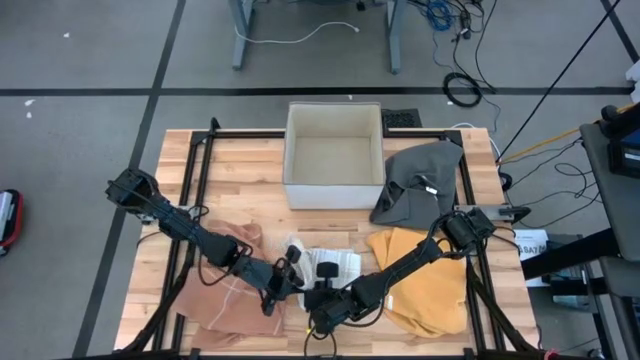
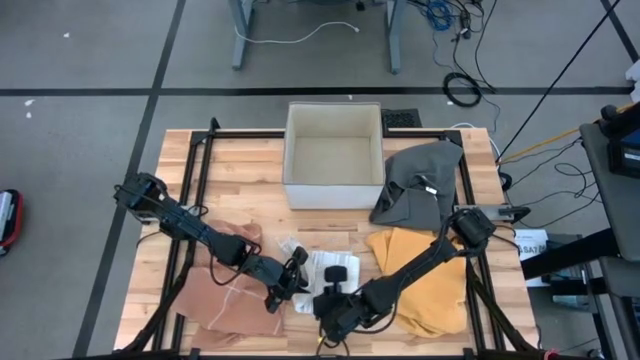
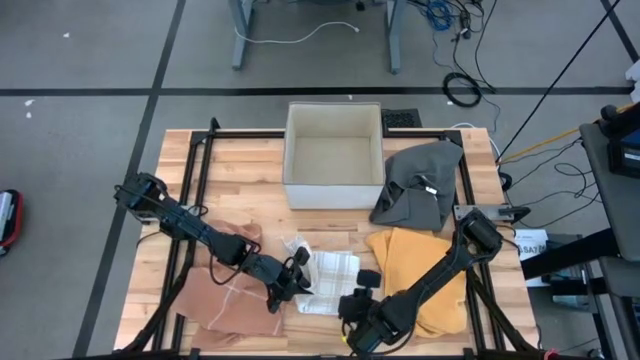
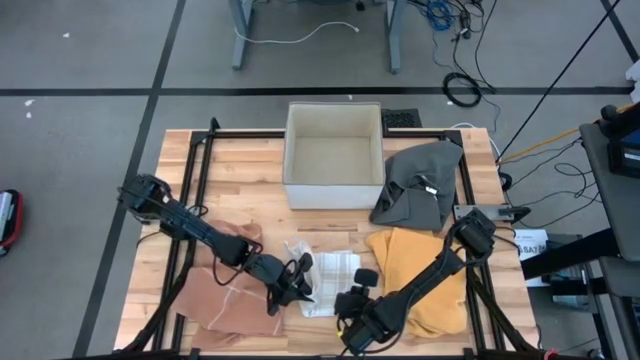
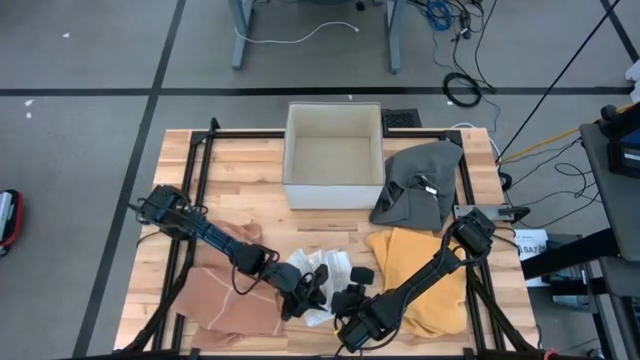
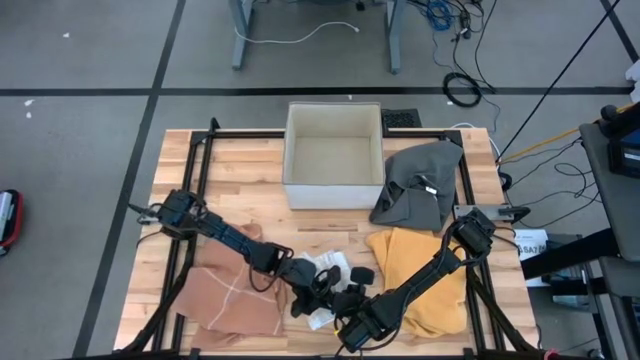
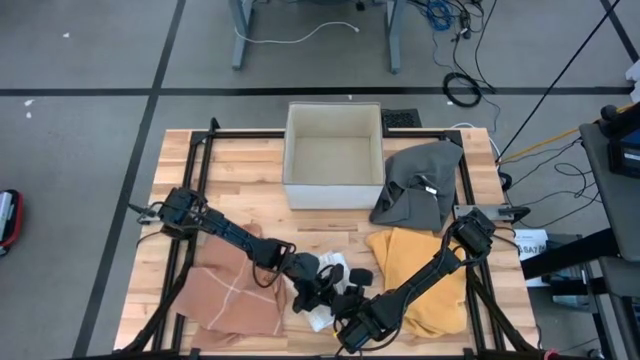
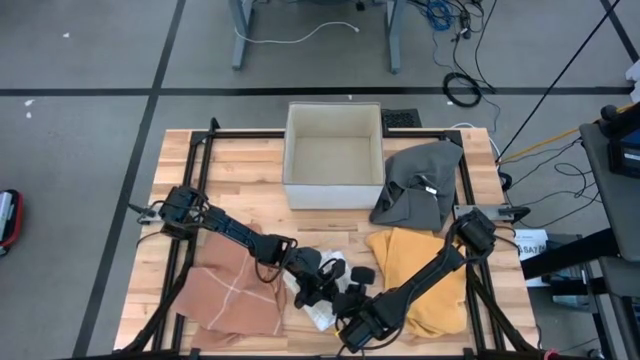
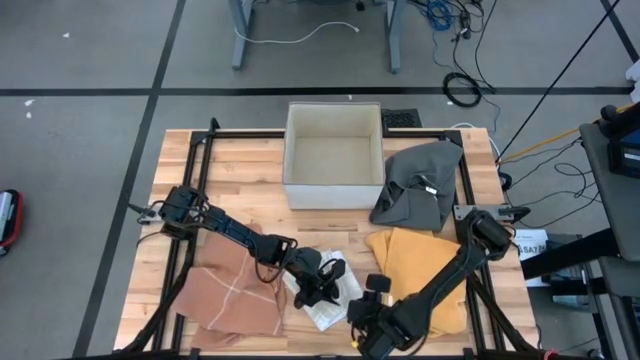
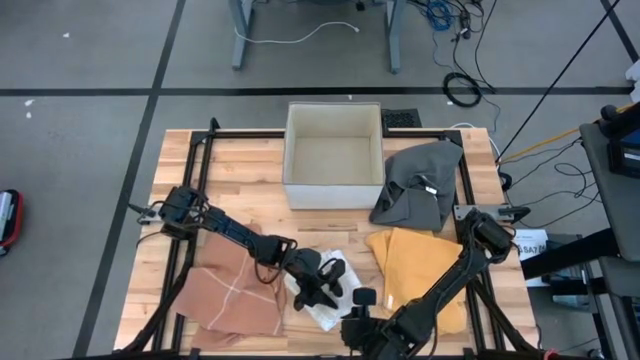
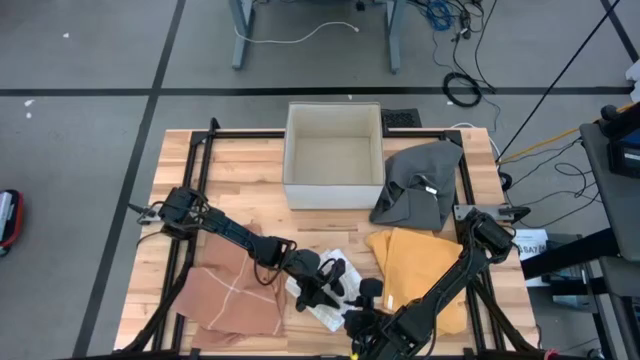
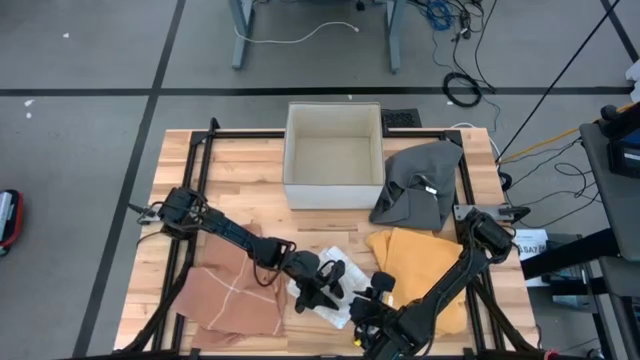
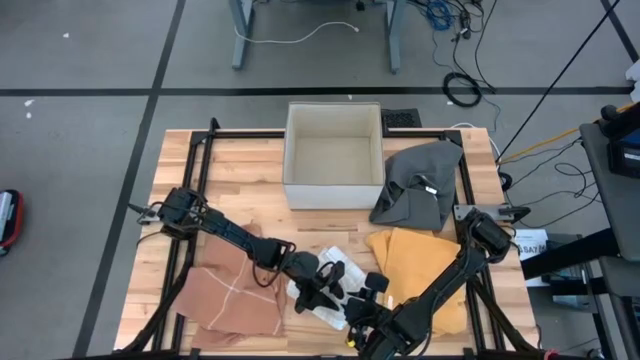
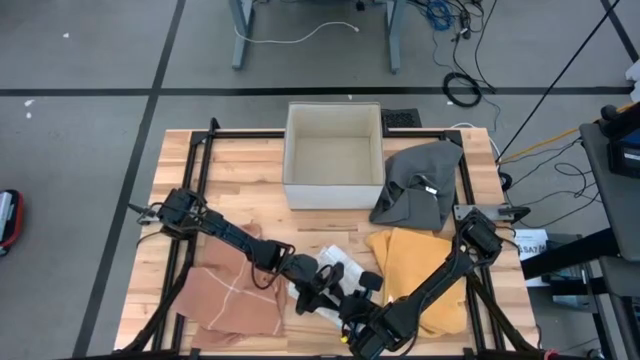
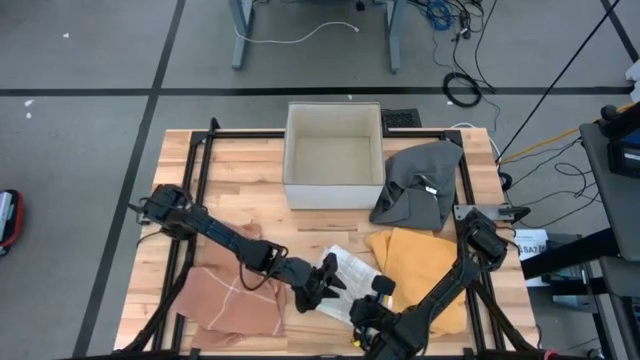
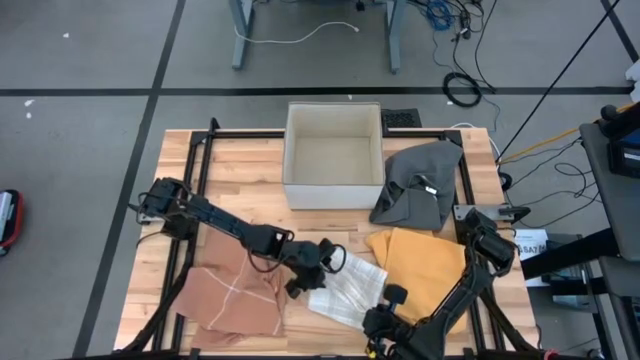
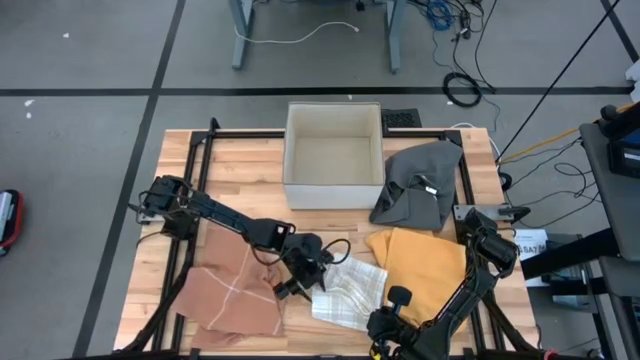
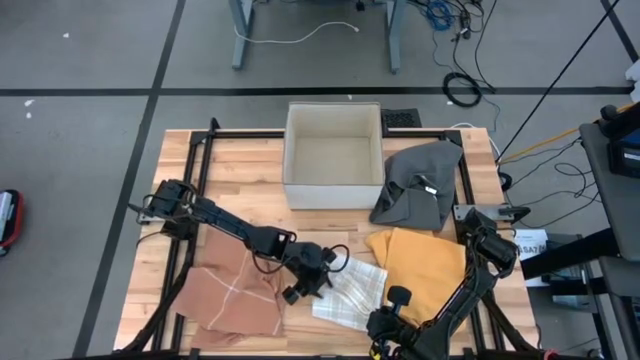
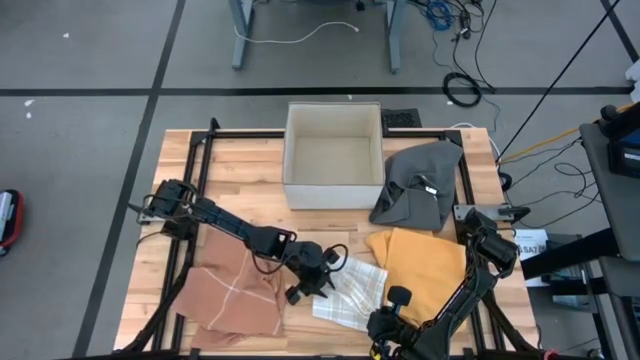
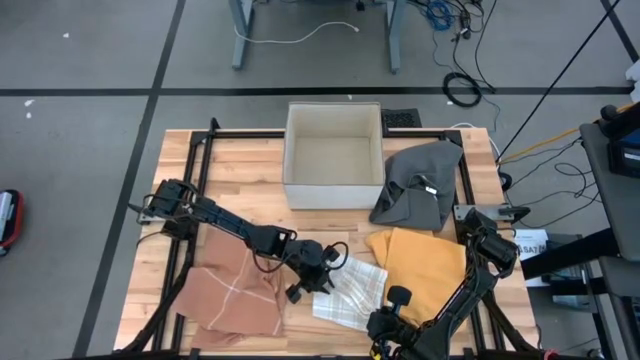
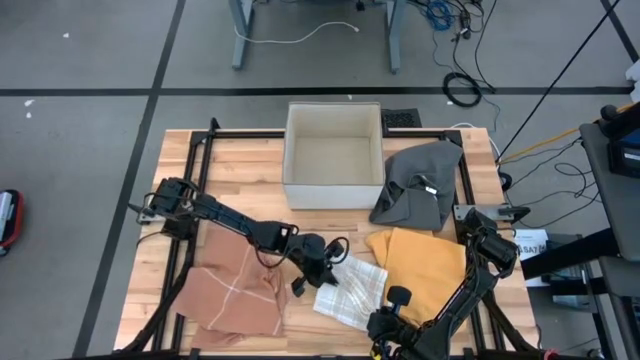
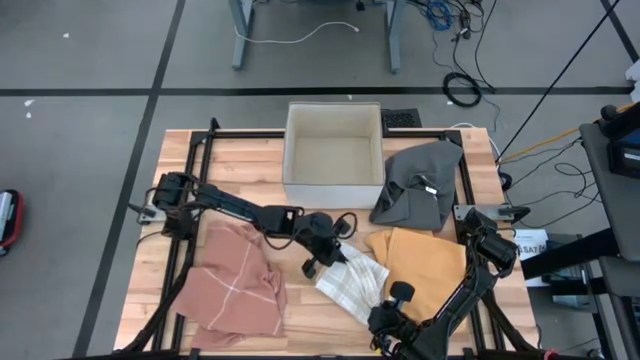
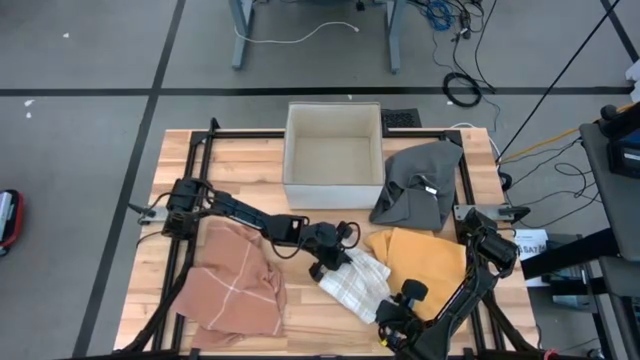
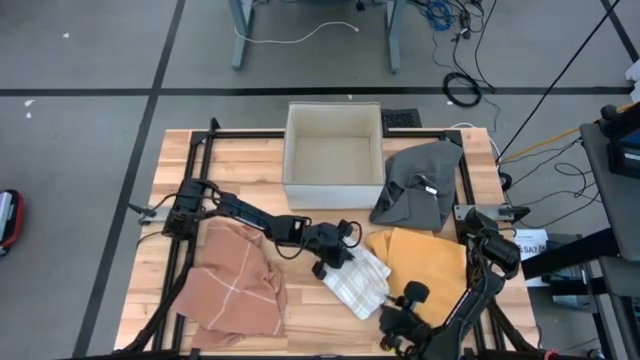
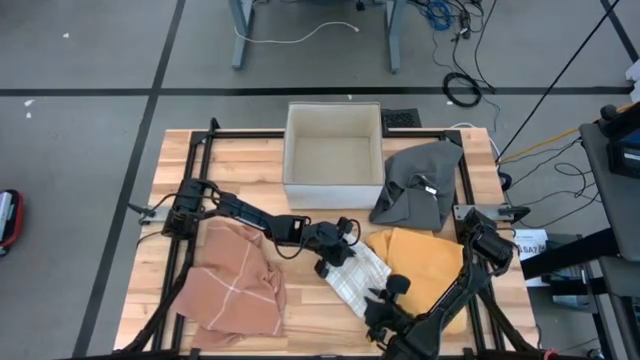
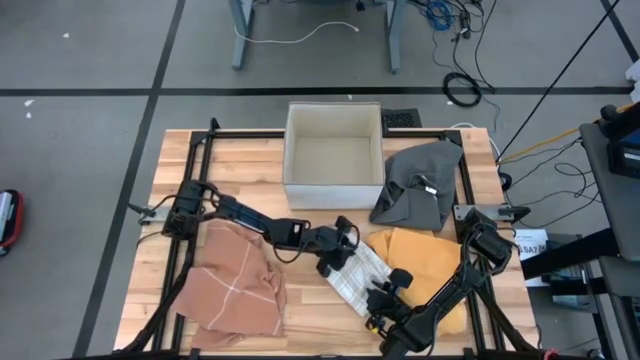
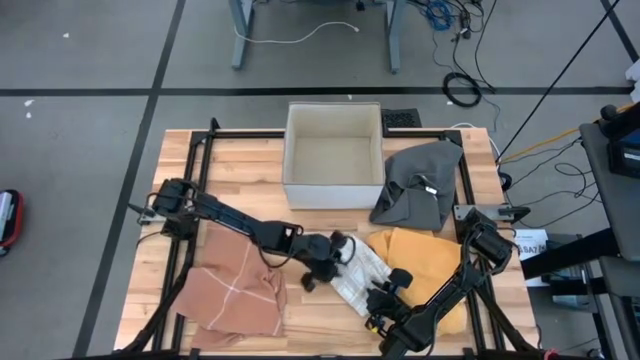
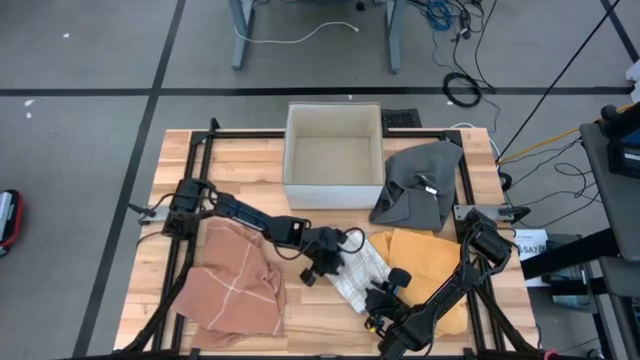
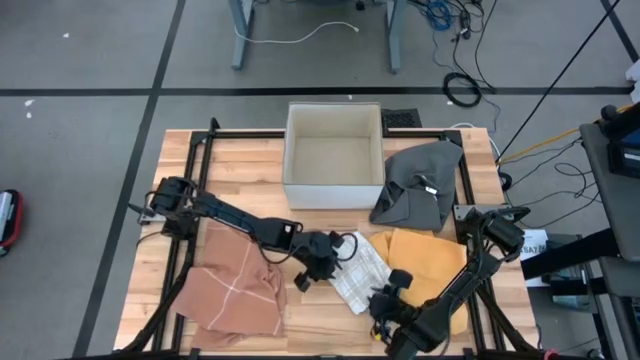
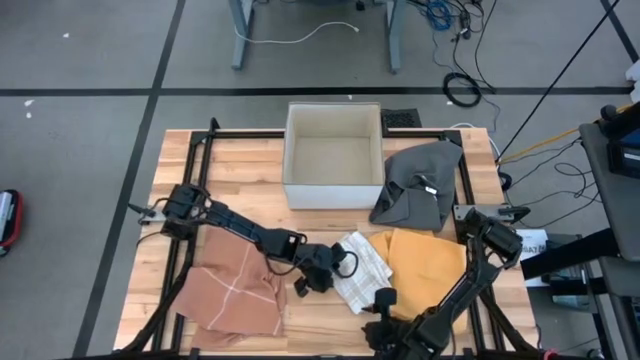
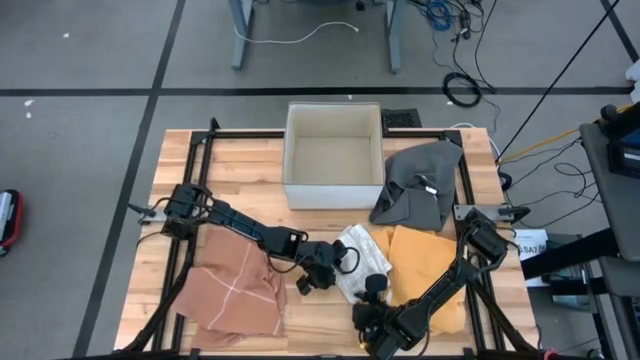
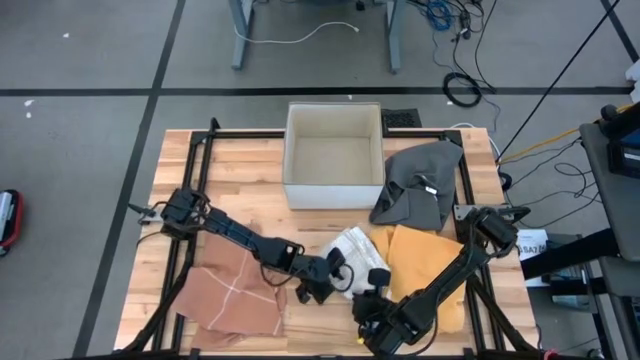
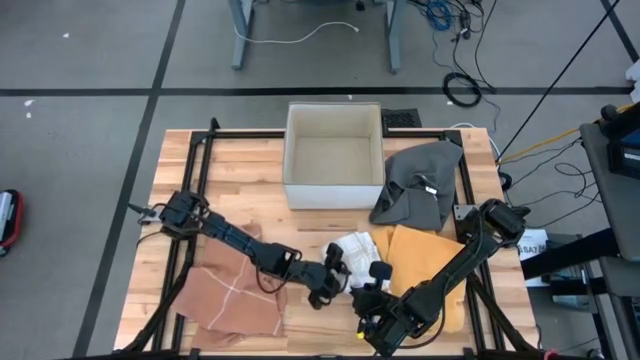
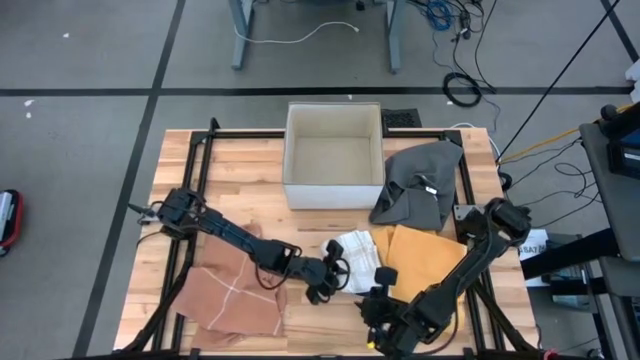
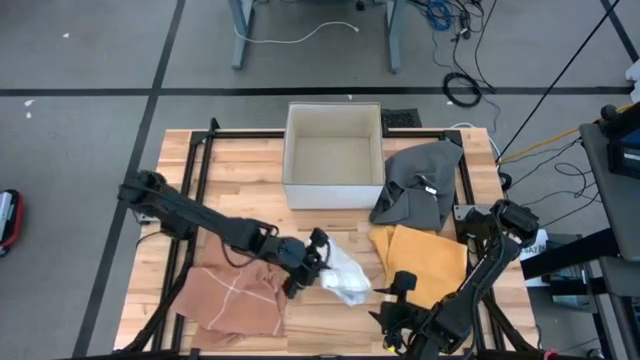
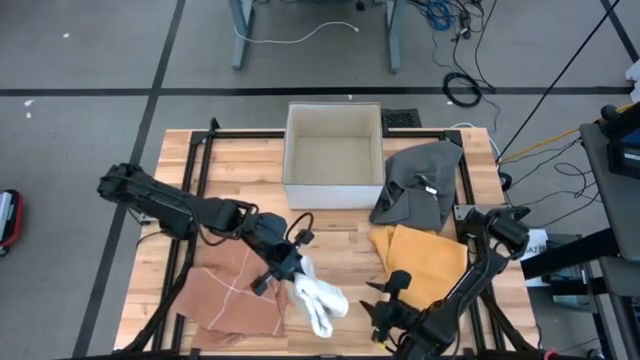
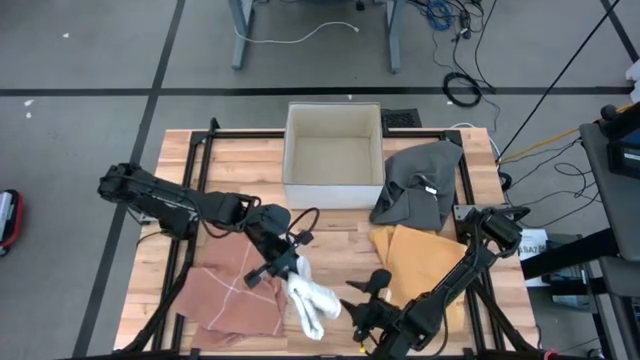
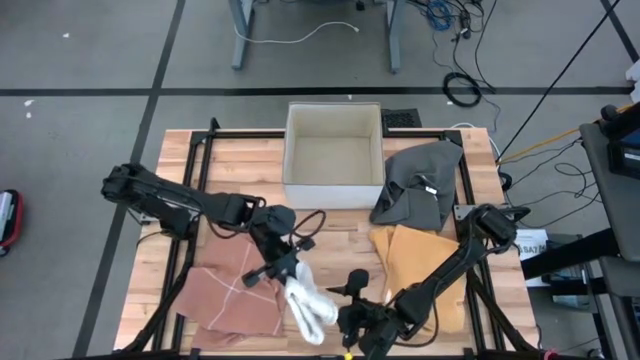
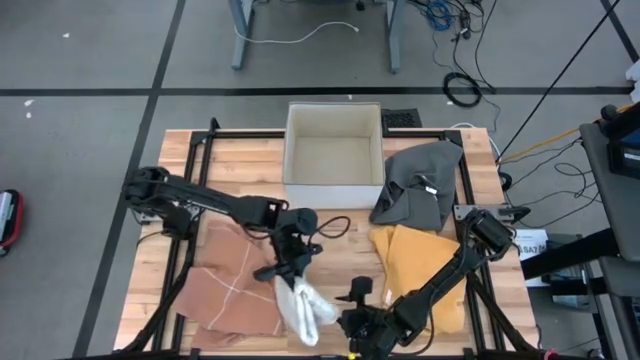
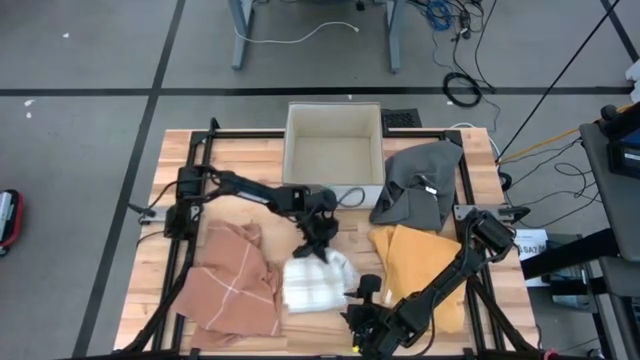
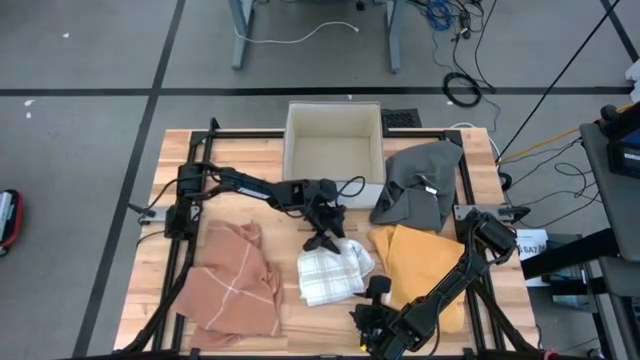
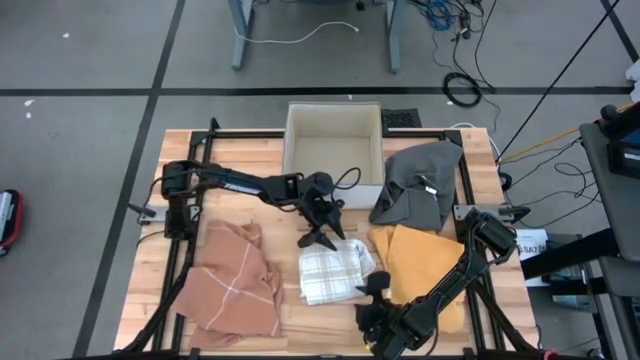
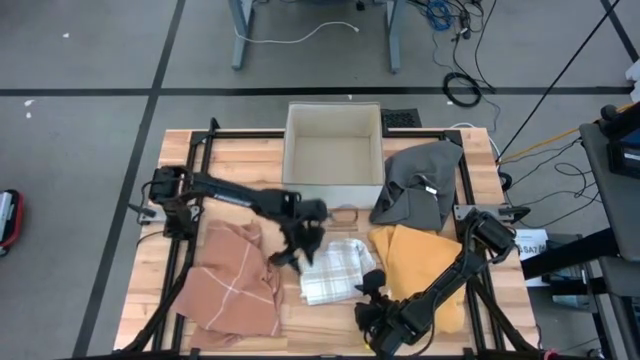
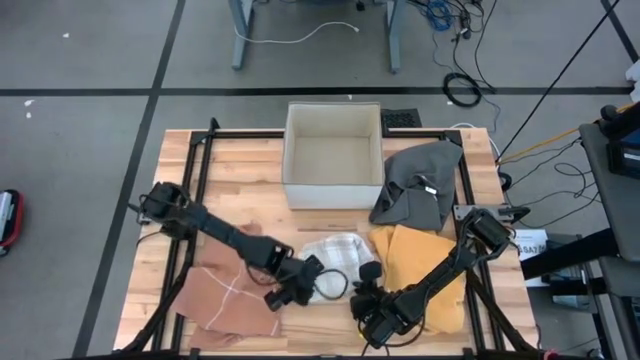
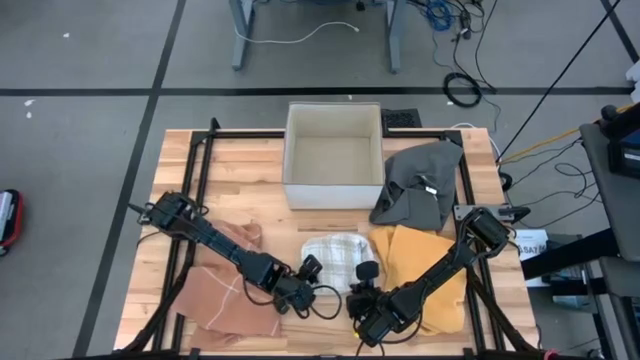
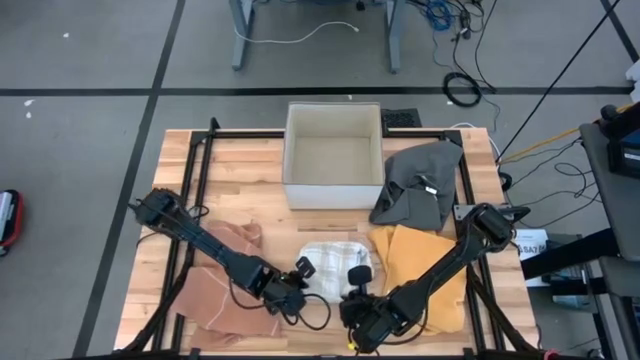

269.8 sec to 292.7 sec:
Task: Fold towel
Fold the white patterned towel
